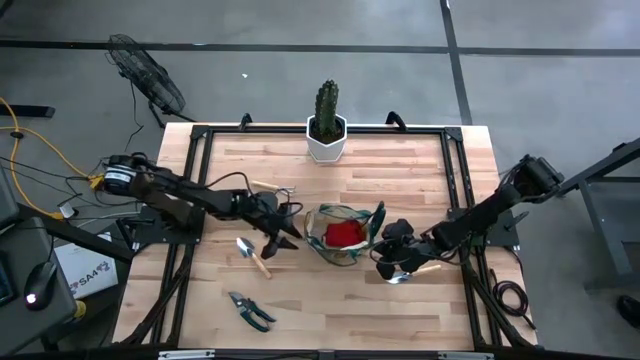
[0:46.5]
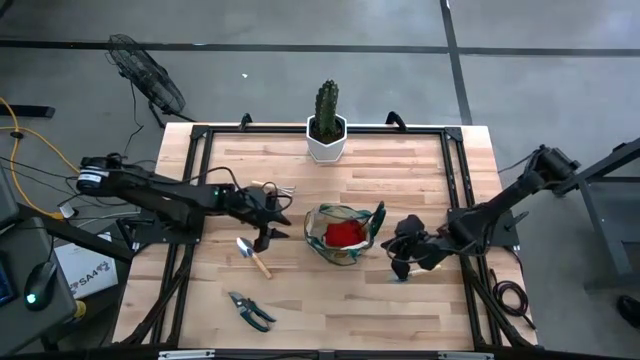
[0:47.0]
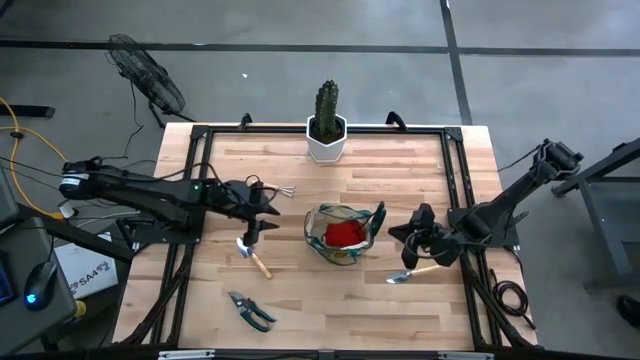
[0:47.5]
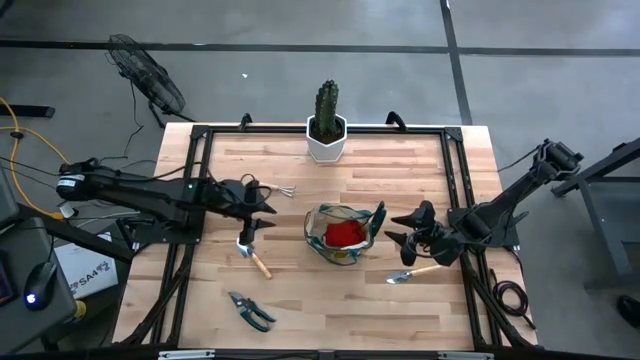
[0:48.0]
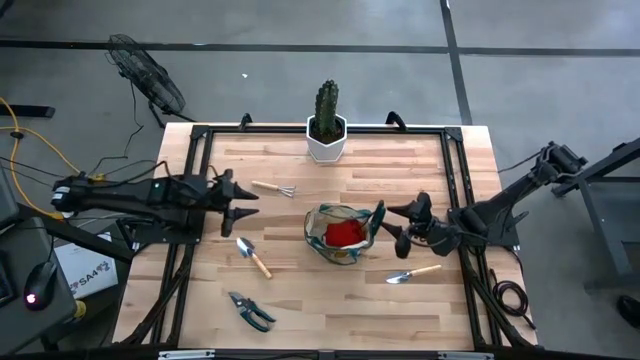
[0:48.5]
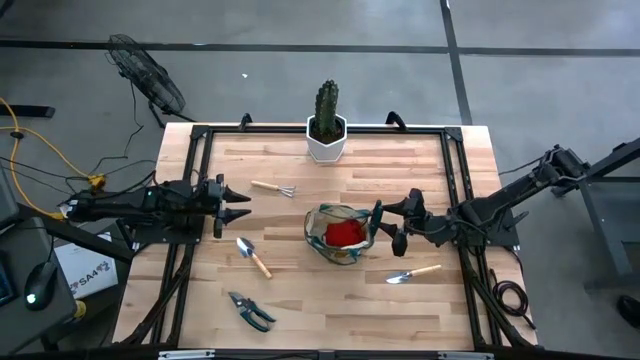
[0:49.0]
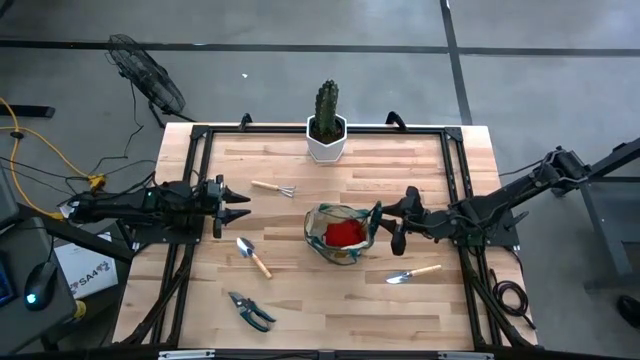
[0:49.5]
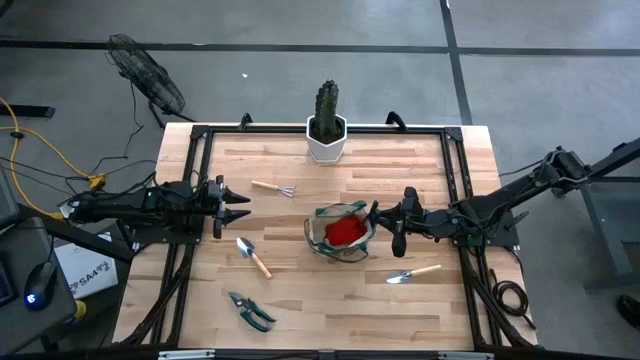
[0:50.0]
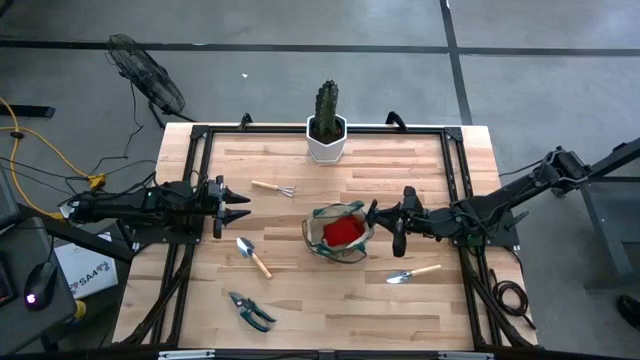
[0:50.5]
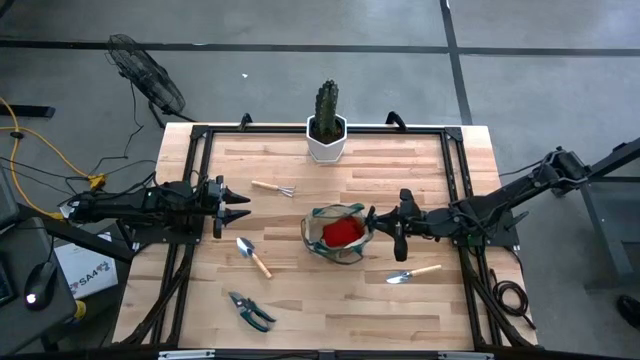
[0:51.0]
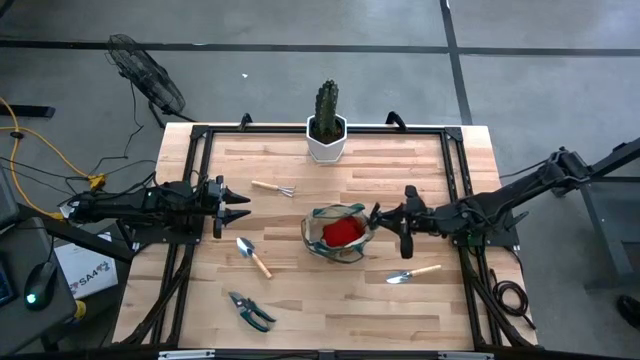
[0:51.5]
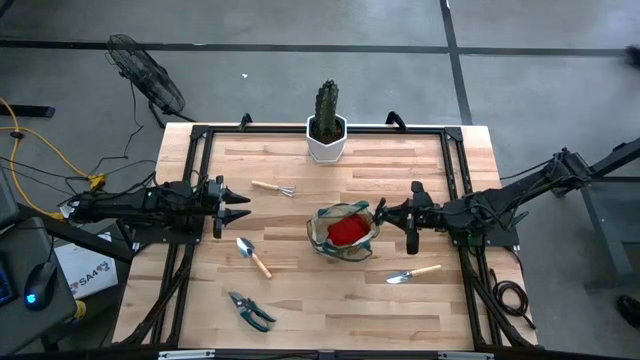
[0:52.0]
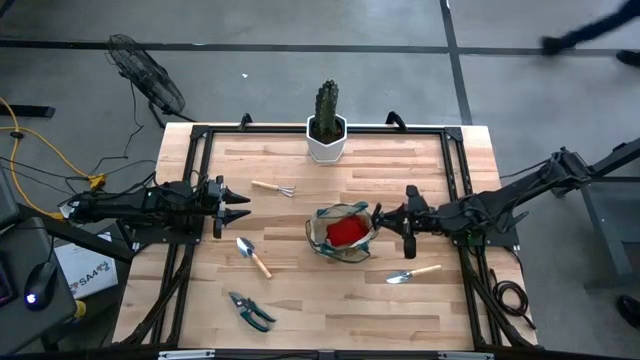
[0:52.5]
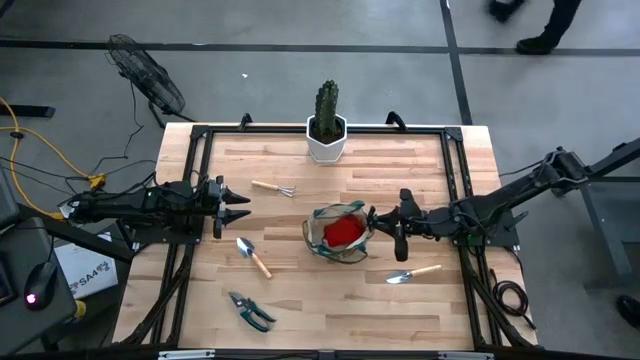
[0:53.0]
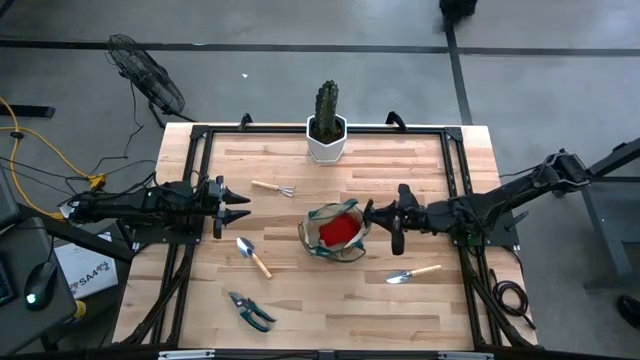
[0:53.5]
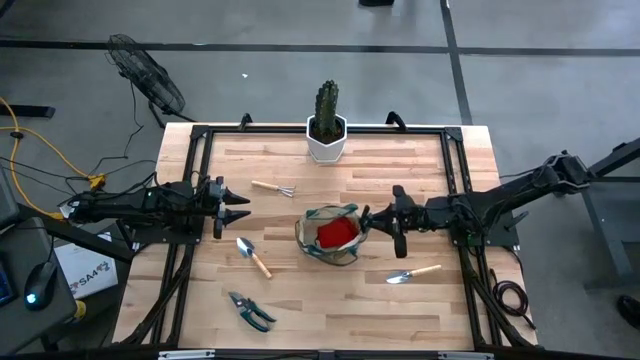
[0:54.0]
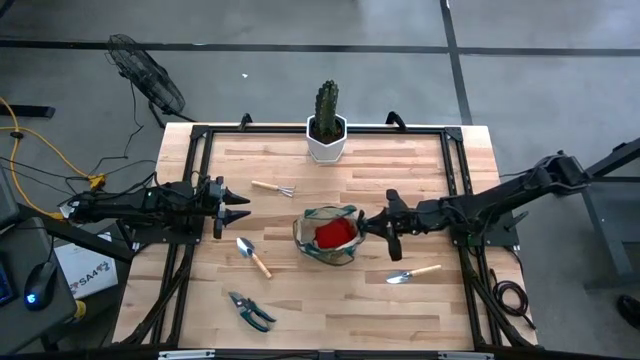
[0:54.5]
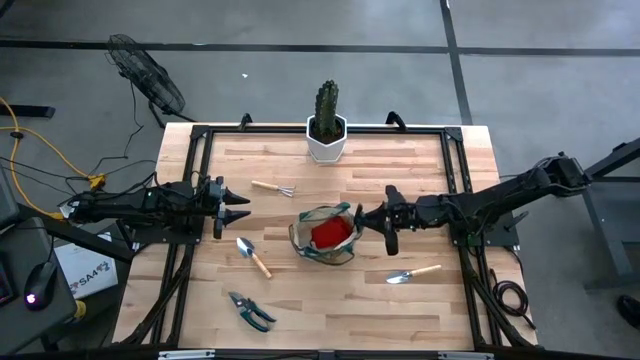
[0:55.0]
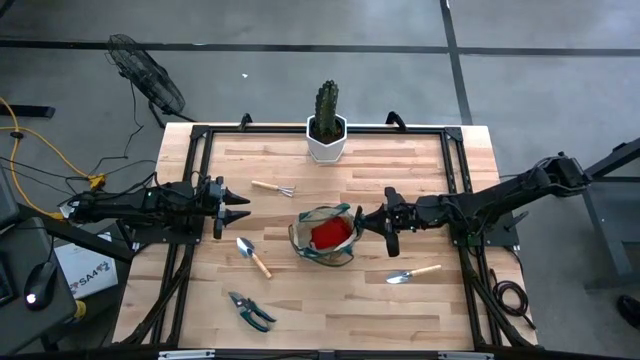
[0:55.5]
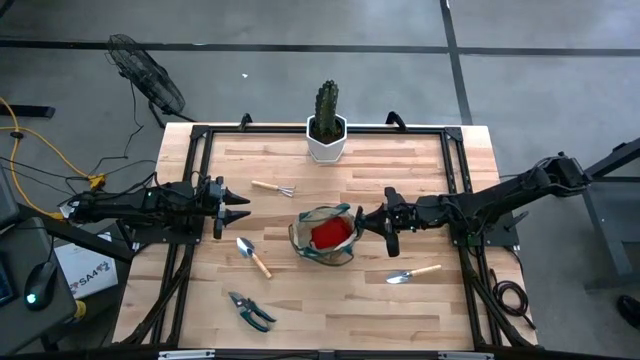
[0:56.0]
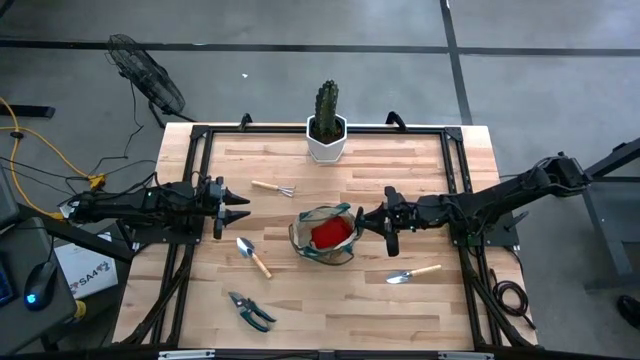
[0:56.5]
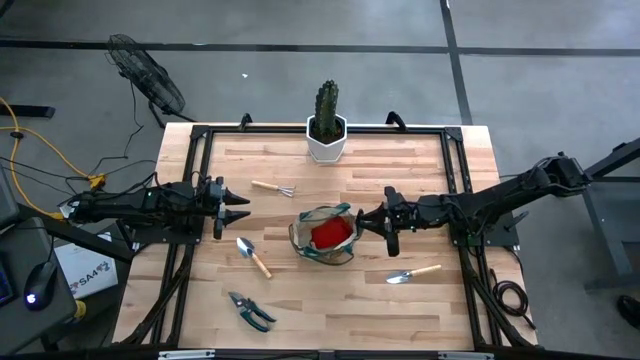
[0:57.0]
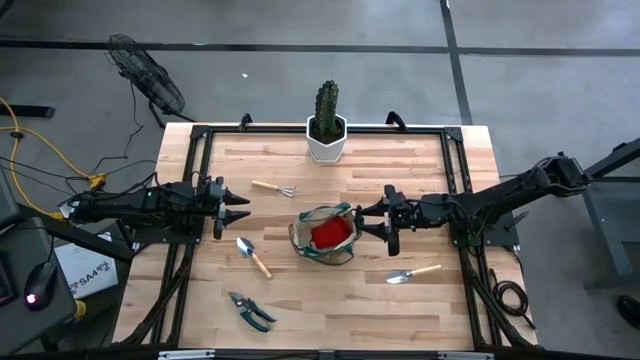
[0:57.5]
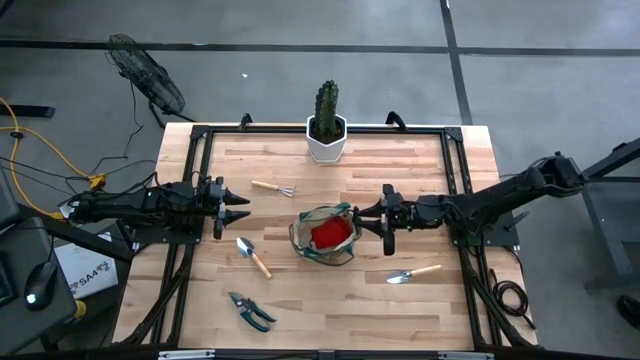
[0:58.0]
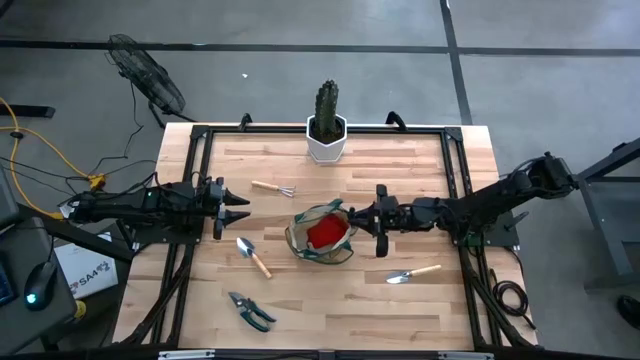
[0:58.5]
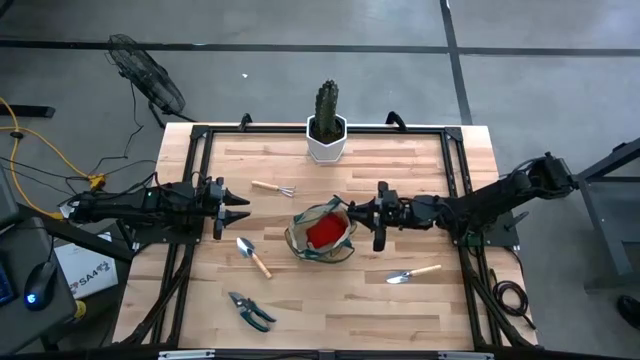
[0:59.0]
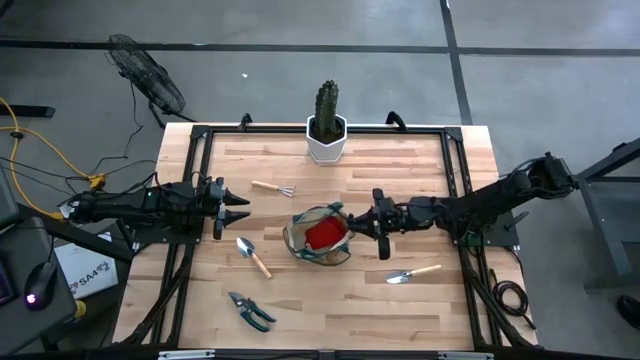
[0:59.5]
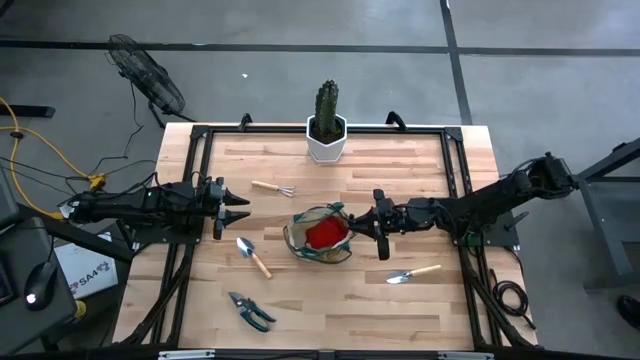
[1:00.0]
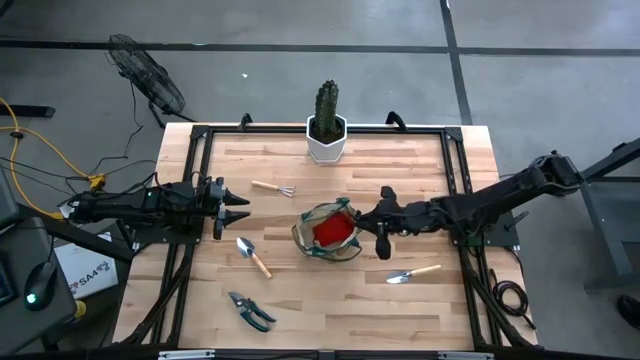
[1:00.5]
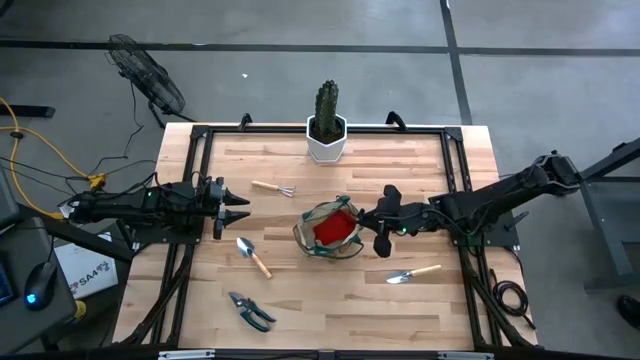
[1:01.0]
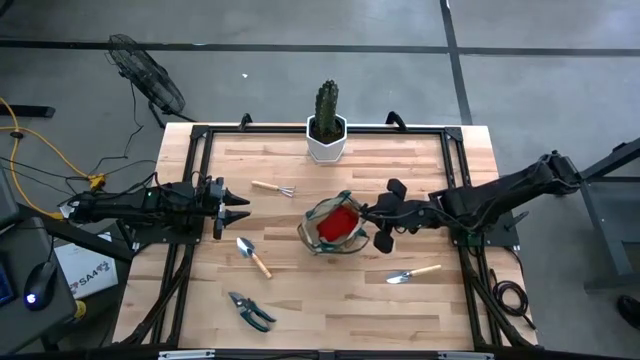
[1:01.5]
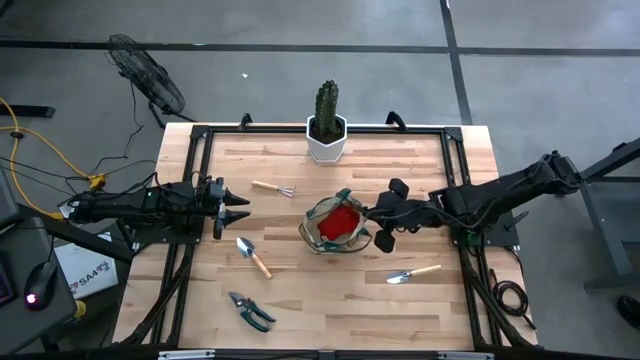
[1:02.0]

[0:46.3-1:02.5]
Task: Pick & Place Garden tools in Gardening bag
Adjust the green shears in the brown gardening bag

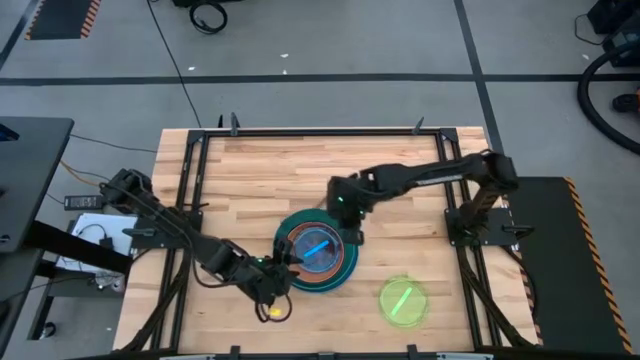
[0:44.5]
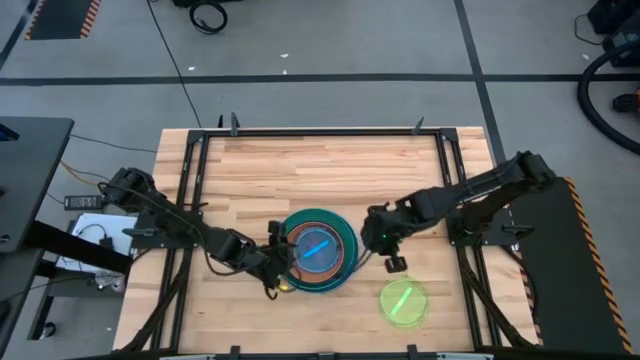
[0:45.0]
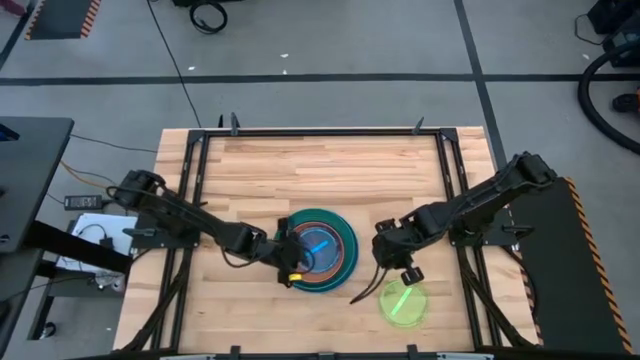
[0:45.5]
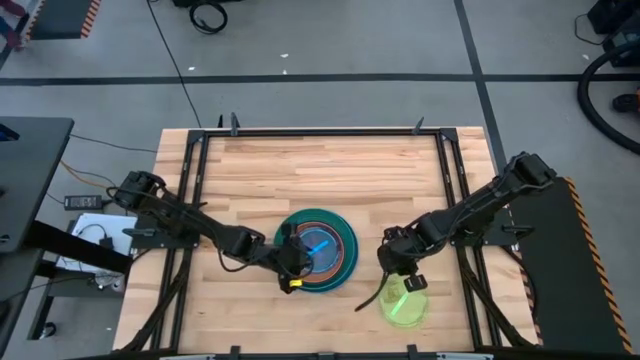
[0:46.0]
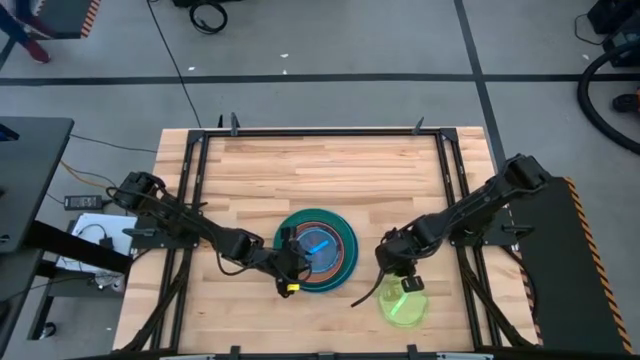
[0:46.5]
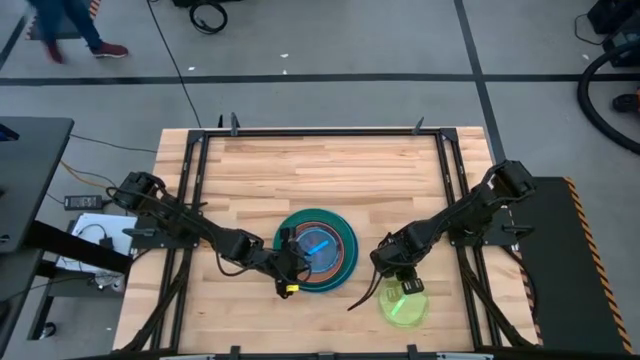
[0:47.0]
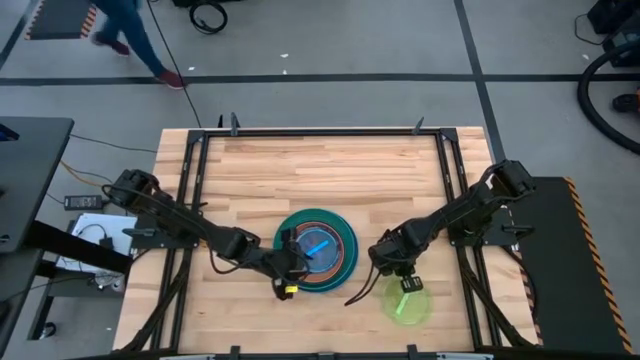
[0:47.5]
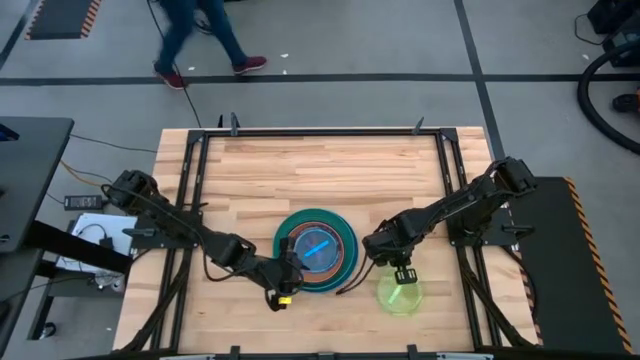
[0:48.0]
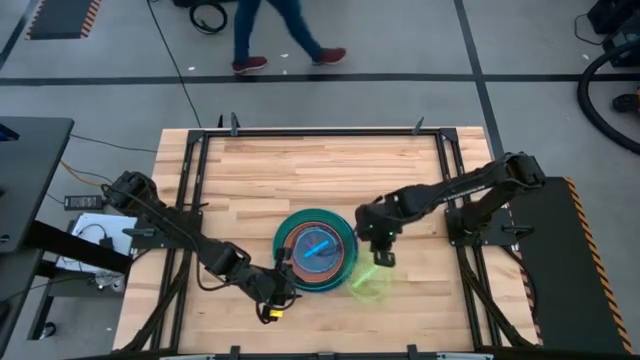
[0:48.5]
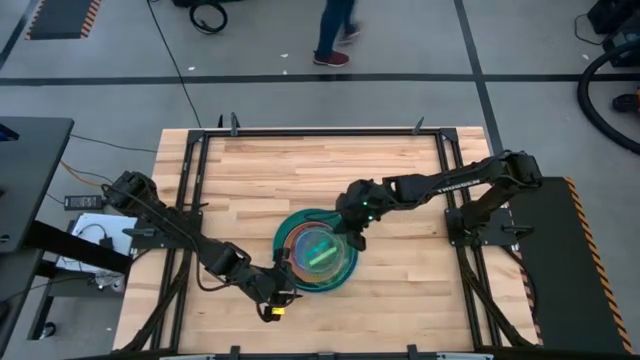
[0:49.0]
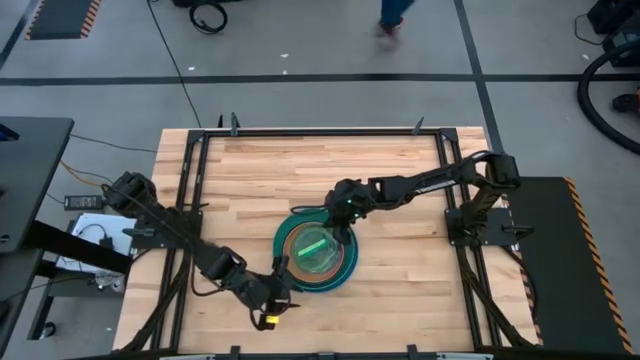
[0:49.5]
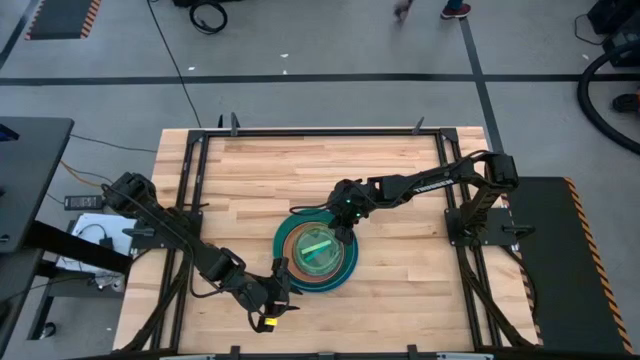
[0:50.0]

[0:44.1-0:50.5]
Task: Stack plastic plates
Stack the green transparent plate on top of the blue transparent plate
